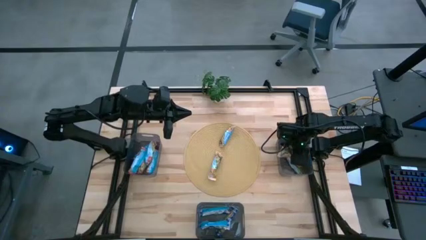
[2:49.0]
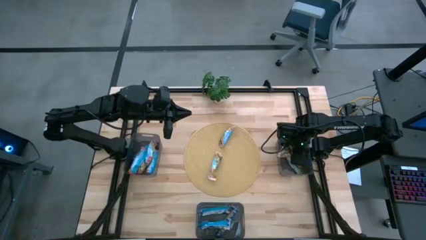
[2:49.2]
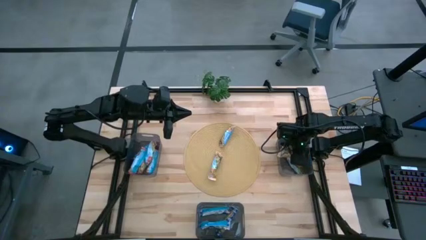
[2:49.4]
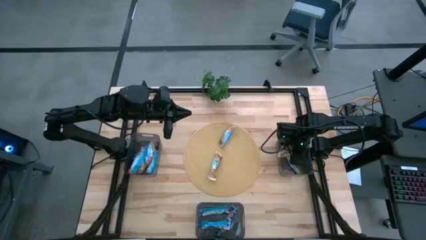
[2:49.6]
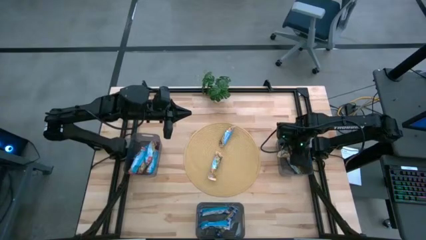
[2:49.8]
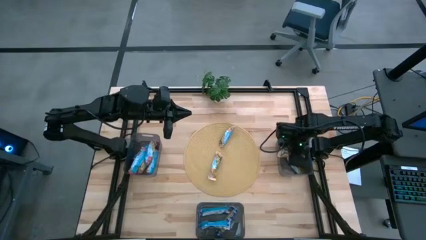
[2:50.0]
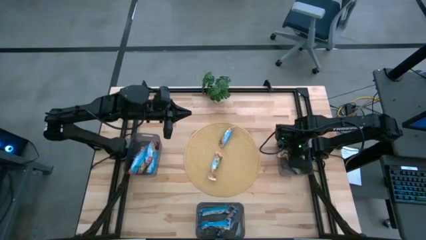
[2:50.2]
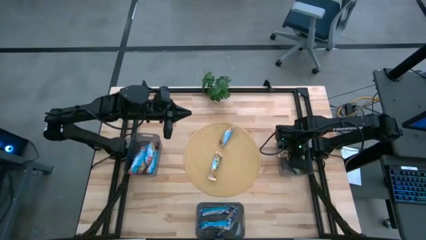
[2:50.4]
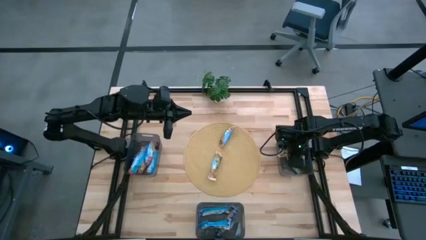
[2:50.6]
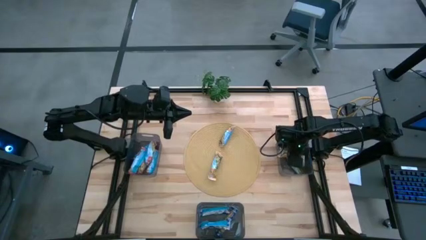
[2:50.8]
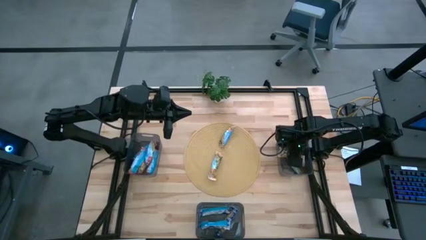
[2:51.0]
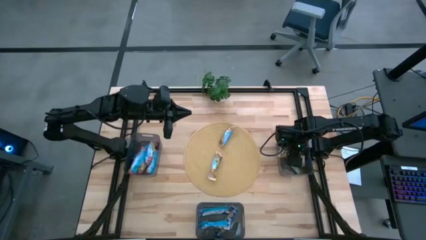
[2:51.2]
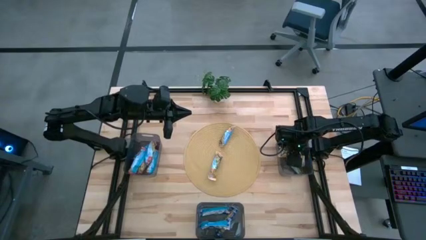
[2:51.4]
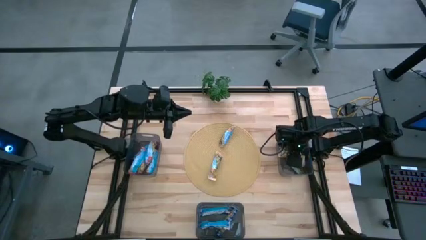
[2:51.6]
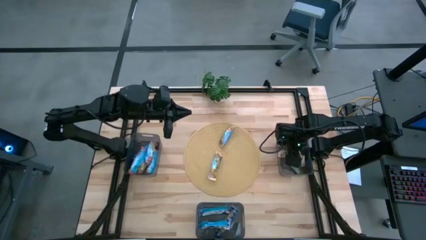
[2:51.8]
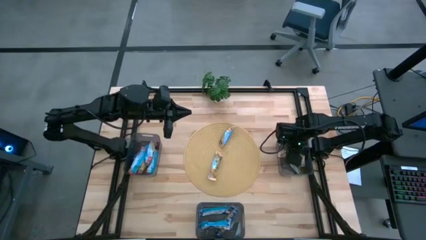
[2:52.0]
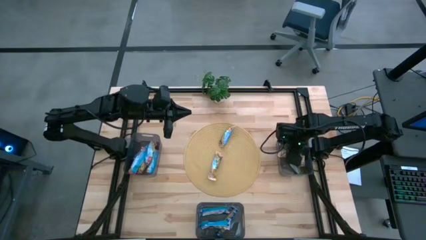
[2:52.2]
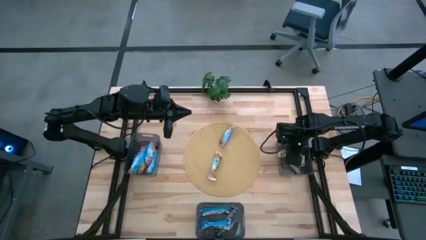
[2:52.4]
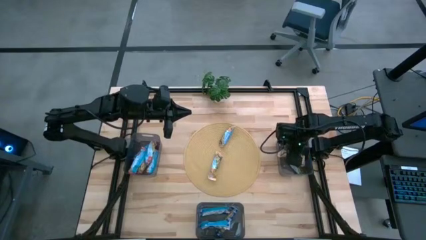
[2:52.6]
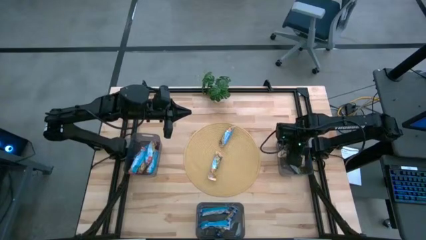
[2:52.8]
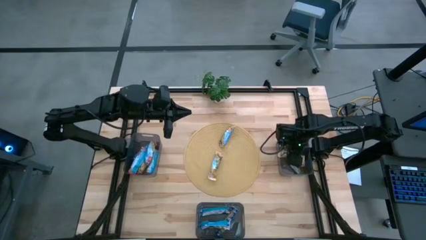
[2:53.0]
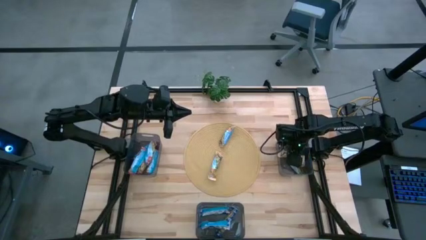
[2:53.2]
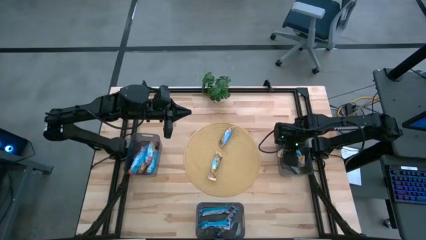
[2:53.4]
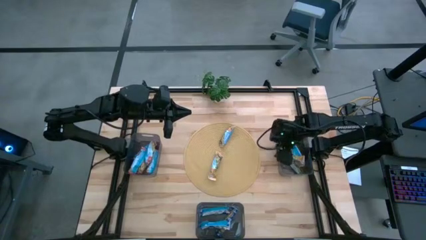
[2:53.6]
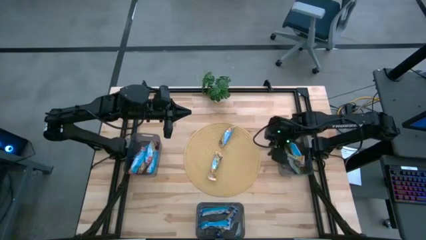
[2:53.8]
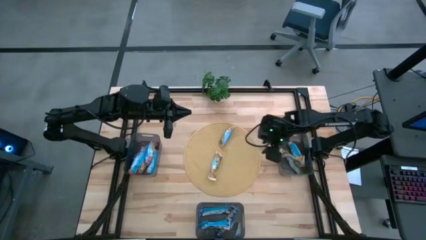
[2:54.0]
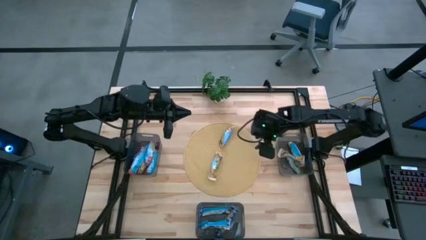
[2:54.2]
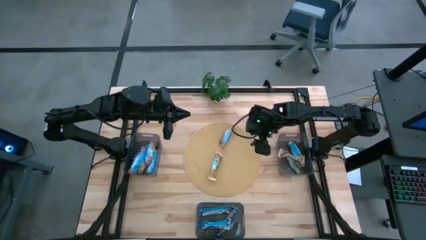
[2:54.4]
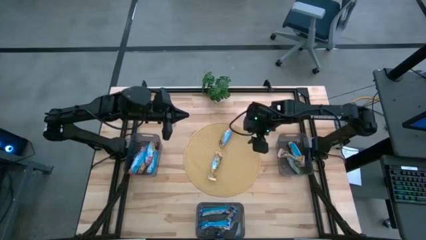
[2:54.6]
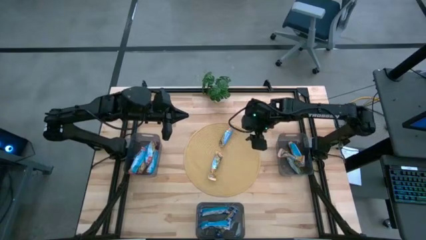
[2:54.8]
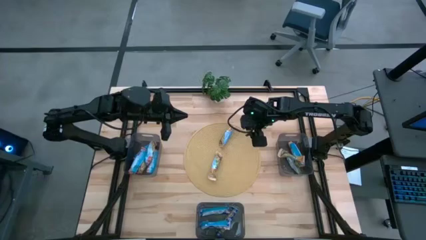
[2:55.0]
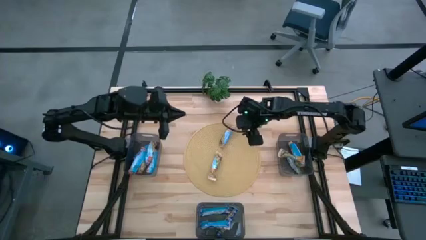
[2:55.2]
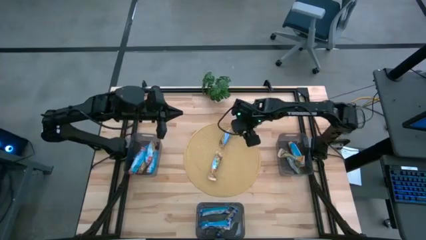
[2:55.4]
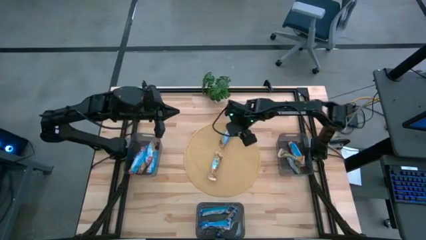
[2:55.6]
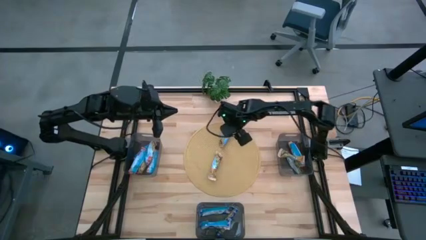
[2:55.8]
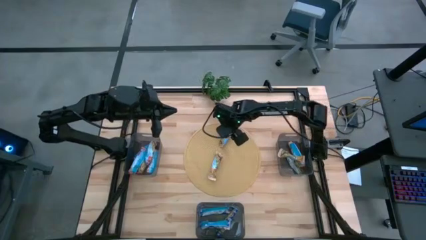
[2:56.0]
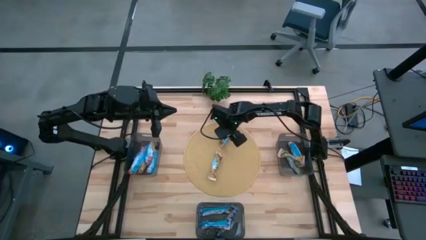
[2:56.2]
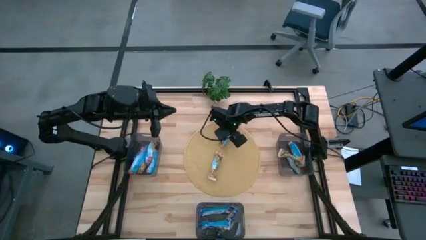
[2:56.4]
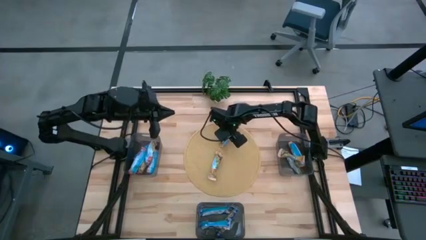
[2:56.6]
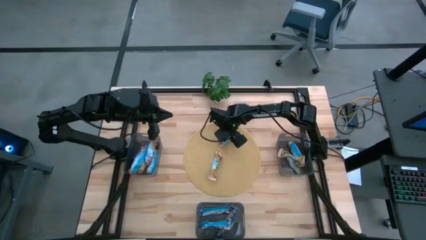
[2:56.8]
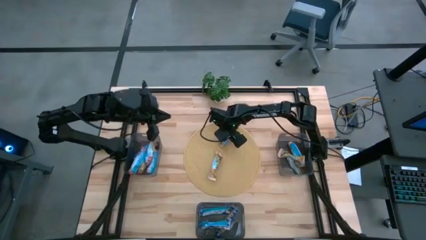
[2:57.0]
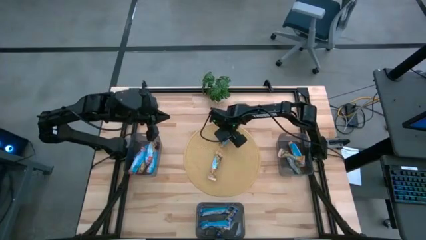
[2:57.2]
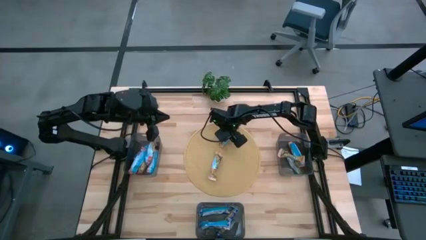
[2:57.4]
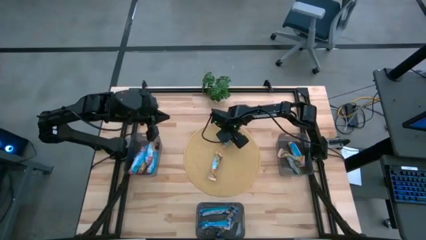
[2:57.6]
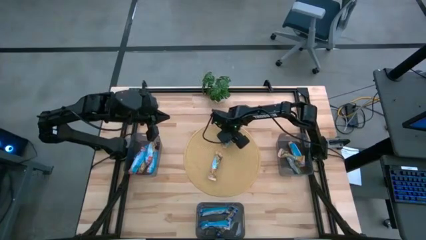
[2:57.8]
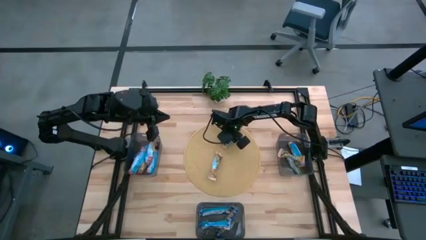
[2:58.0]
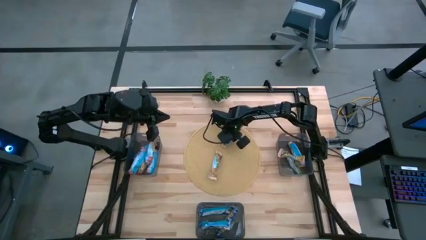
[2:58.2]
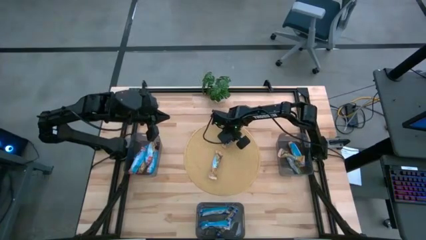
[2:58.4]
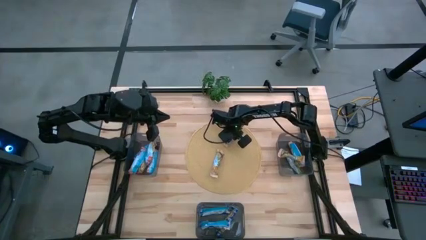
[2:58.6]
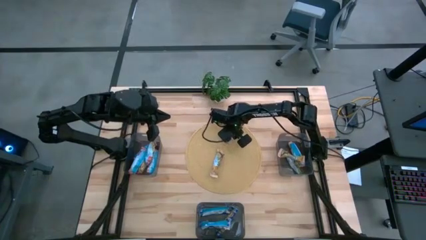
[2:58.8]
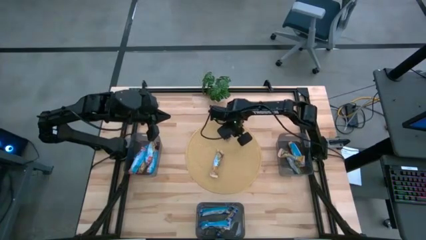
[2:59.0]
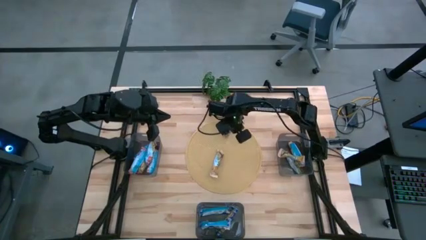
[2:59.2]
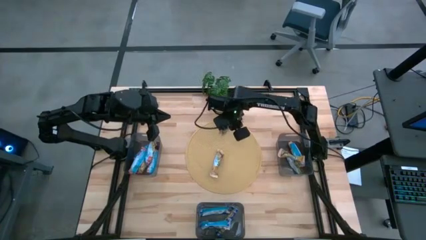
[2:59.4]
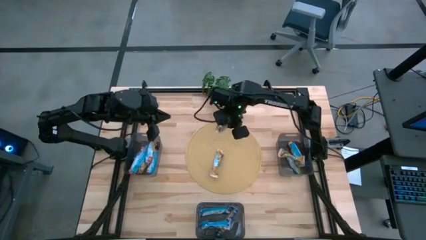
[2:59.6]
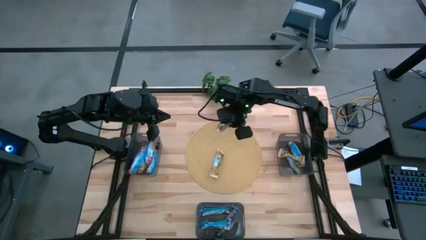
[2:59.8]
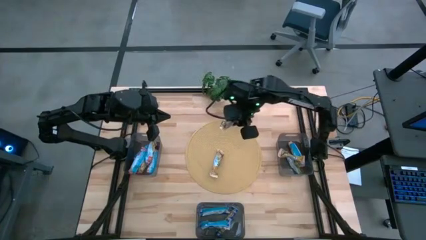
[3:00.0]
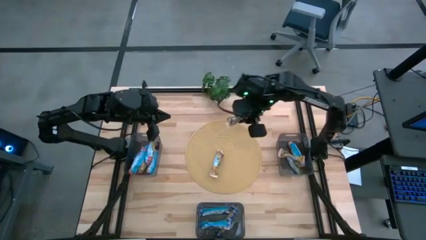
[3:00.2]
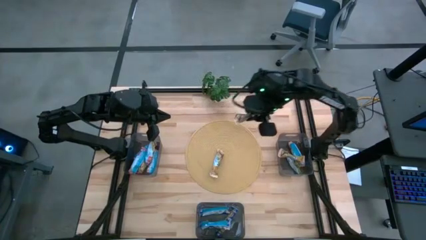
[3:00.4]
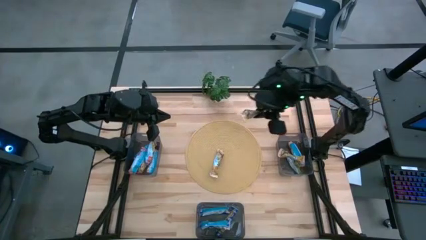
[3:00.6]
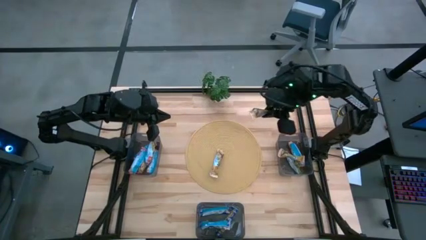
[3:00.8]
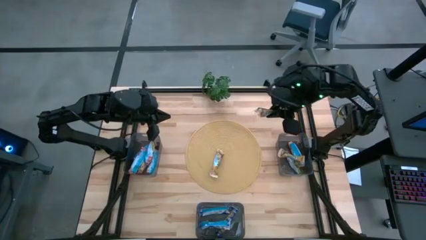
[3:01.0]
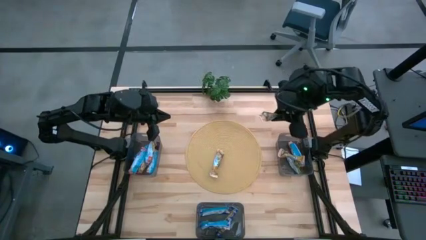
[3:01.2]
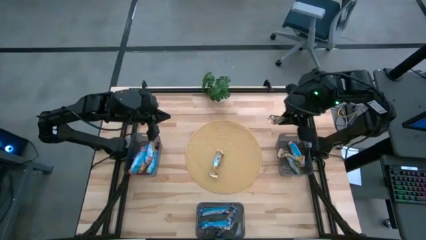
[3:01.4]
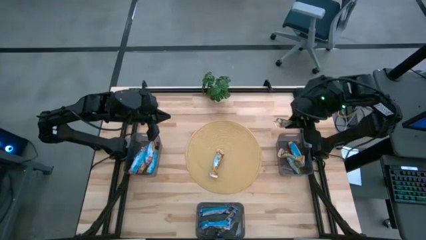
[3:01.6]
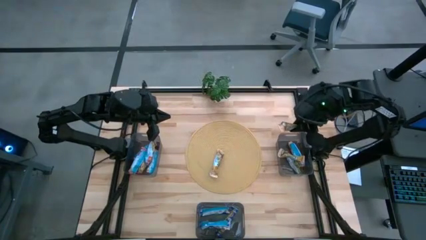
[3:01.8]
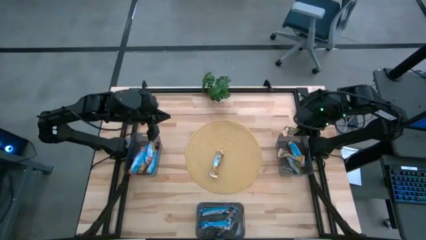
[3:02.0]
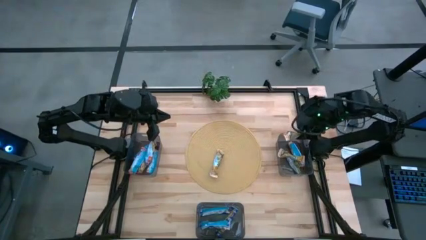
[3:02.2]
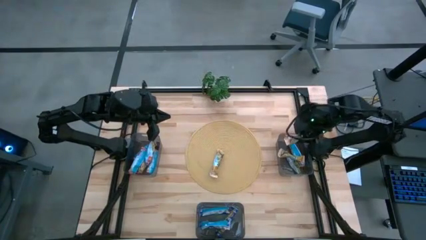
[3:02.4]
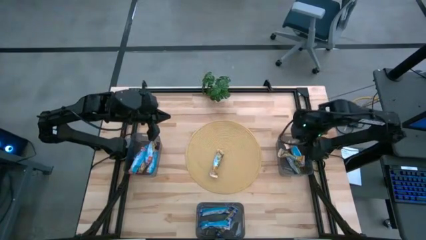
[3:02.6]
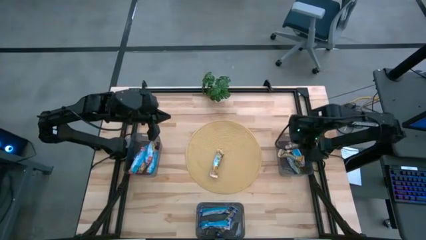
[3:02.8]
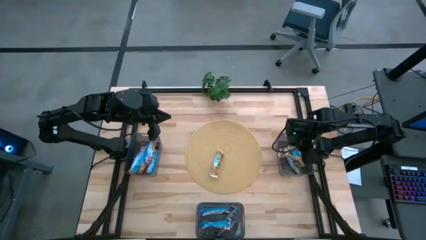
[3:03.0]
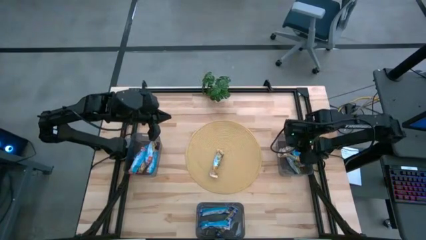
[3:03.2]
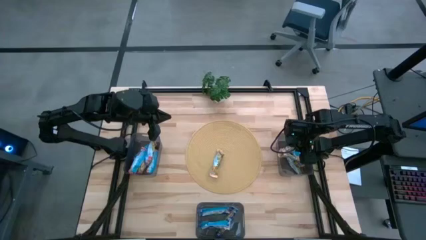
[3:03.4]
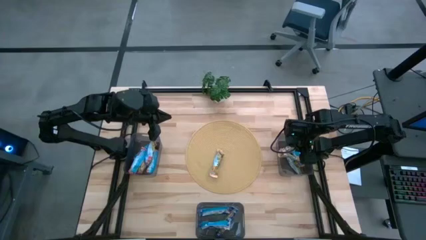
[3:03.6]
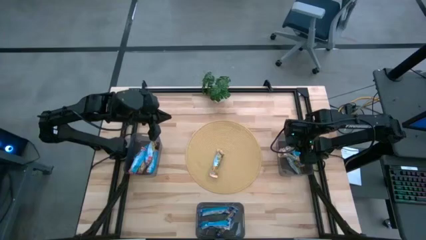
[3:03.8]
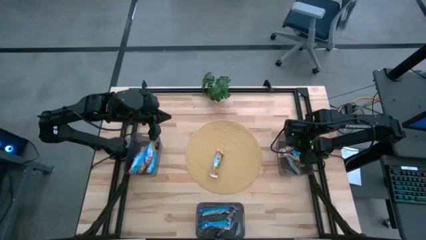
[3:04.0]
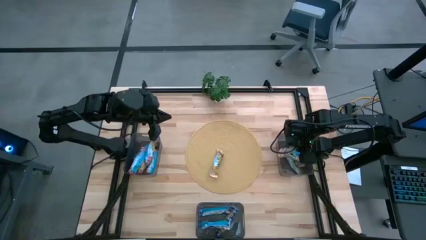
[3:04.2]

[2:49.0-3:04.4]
Task: Pick and place Granola Bars by type
Put the top yellow granola bar into the top right bin
